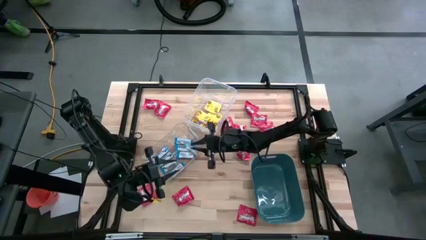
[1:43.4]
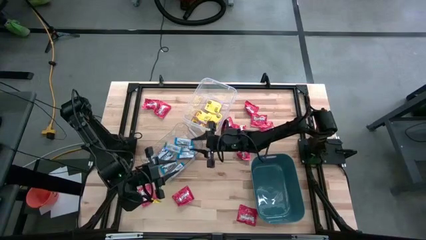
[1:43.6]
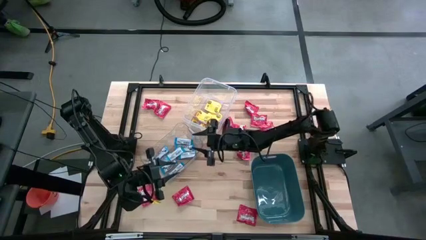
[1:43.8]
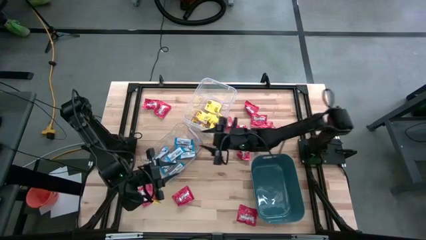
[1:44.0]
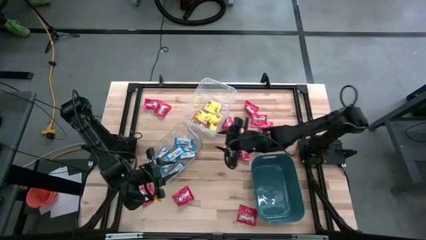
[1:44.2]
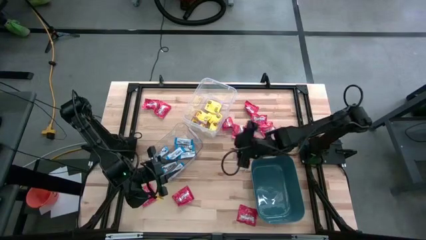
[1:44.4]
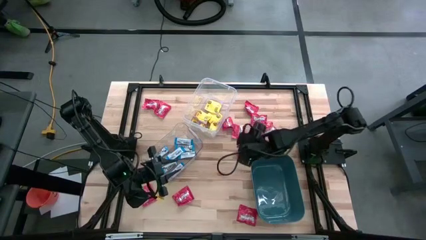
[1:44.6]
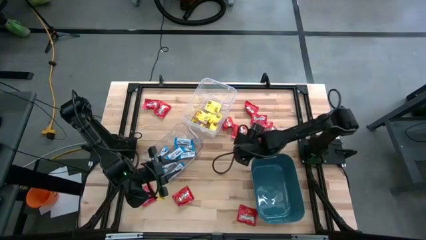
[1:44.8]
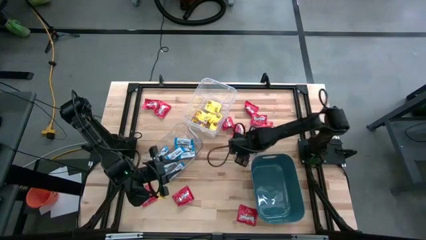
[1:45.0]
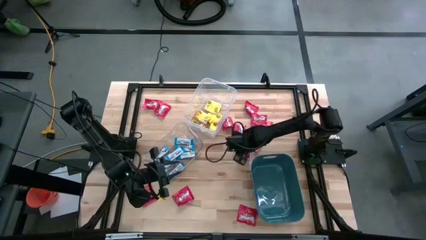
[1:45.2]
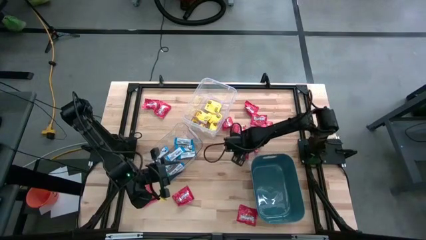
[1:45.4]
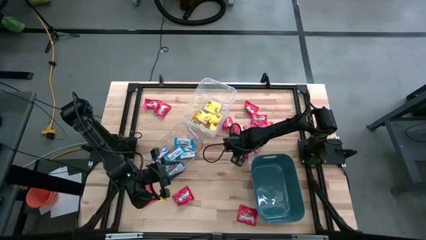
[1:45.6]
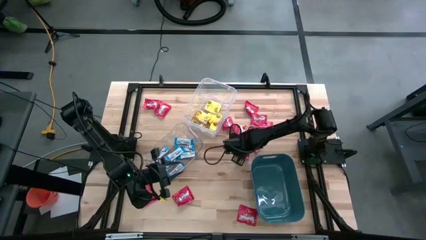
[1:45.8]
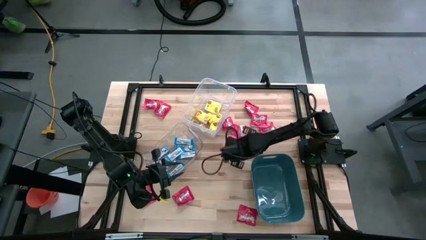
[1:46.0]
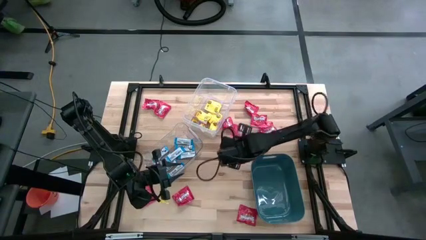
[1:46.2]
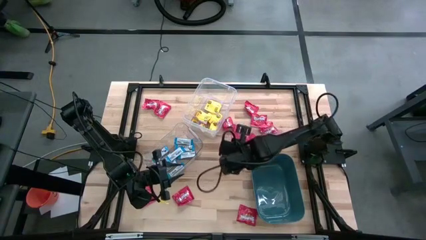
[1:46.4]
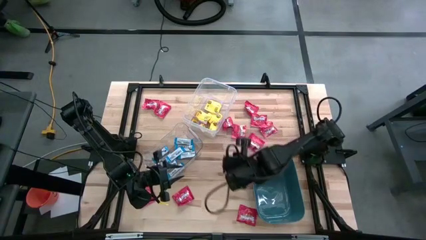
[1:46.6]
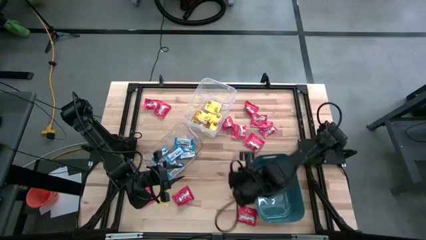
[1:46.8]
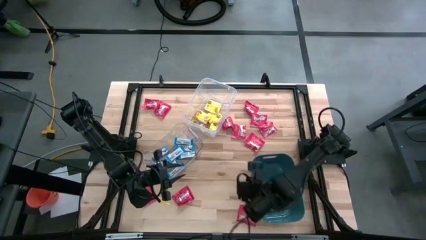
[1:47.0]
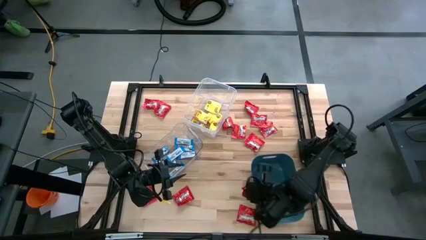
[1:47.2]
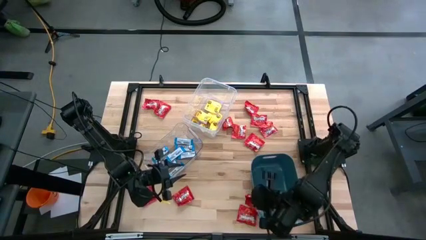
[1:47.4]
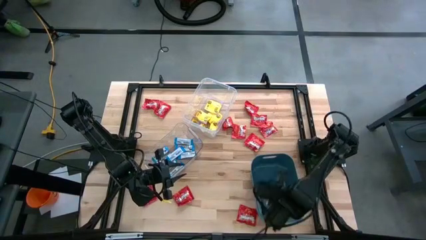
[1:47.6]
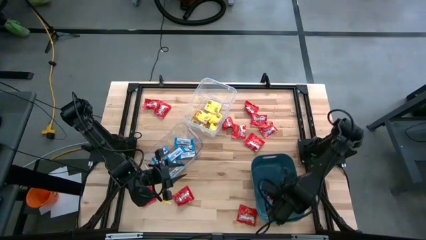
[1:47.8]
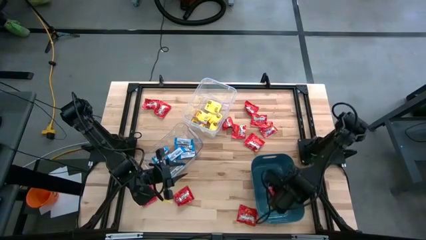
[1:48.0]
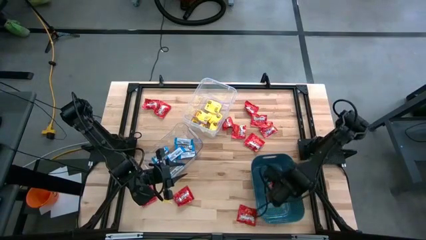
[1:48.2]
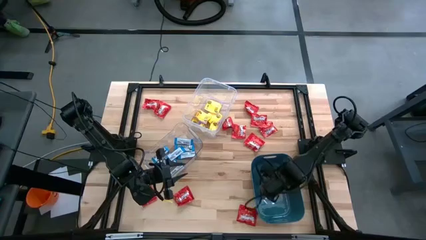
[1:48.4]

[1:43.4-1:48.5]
Task: Sort candy
Put the red candy into the blue bin

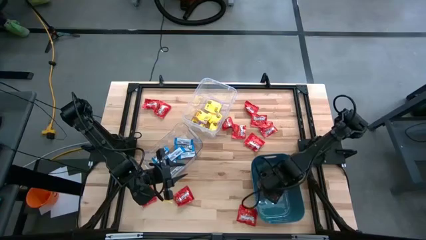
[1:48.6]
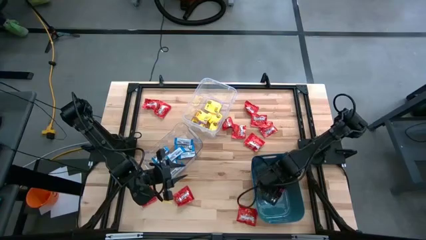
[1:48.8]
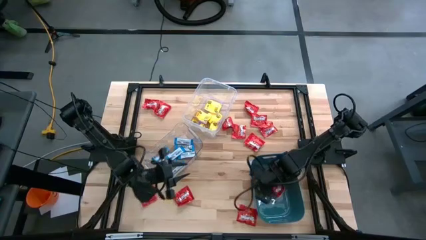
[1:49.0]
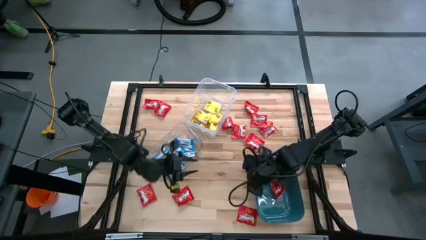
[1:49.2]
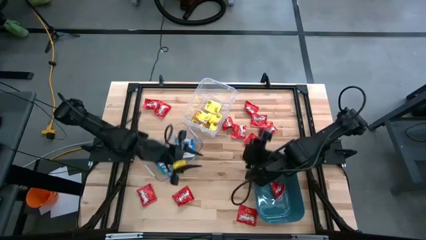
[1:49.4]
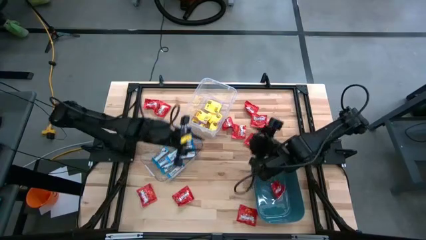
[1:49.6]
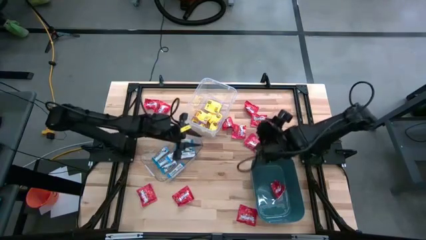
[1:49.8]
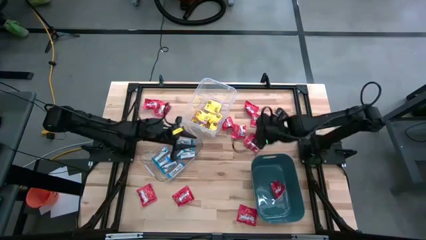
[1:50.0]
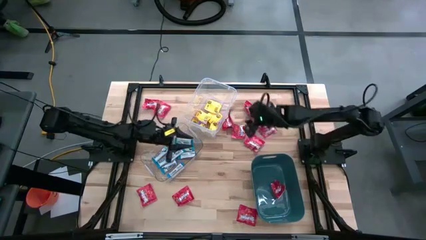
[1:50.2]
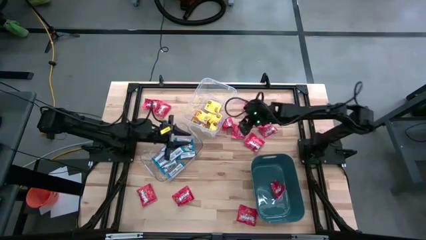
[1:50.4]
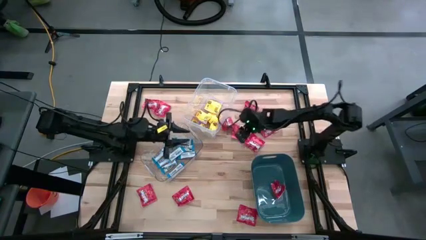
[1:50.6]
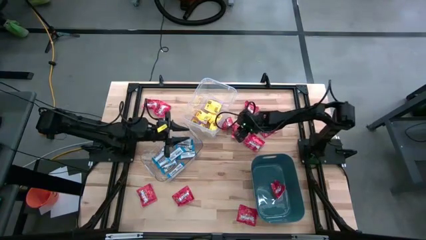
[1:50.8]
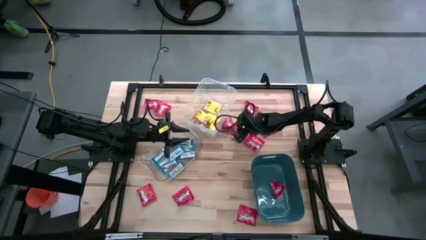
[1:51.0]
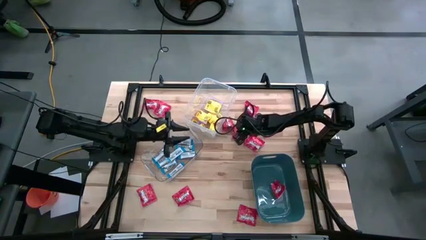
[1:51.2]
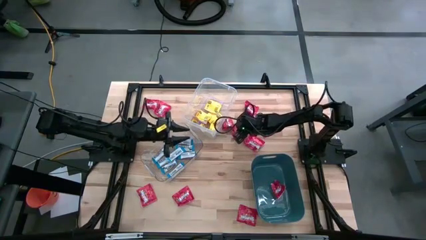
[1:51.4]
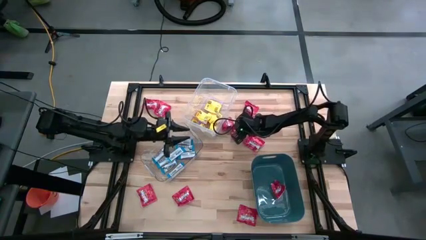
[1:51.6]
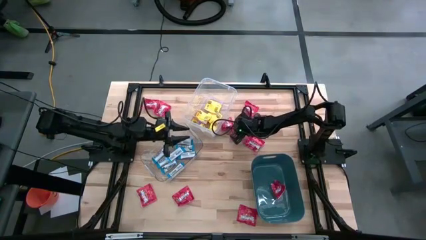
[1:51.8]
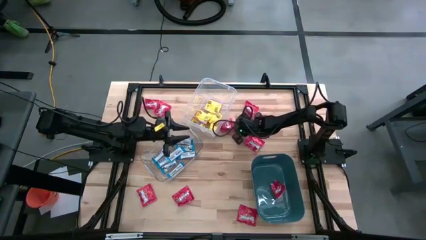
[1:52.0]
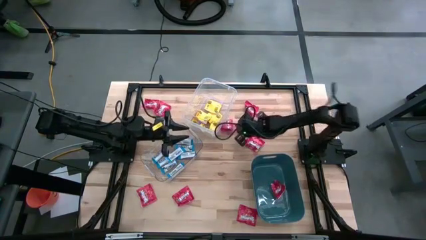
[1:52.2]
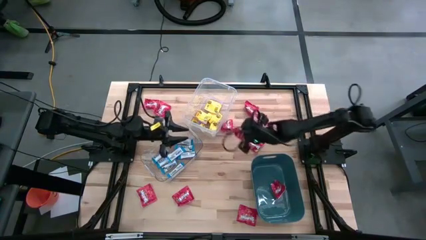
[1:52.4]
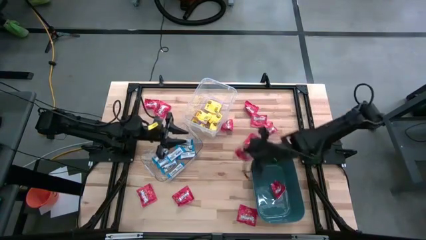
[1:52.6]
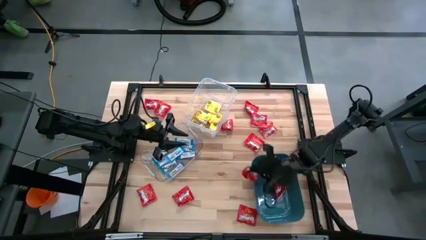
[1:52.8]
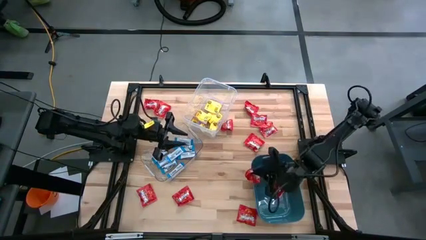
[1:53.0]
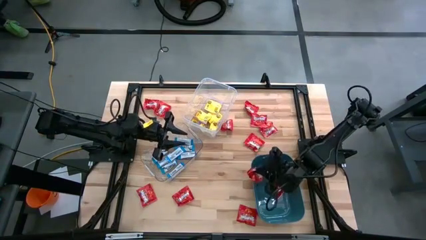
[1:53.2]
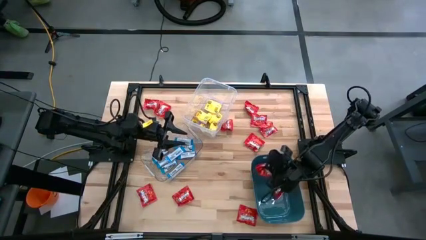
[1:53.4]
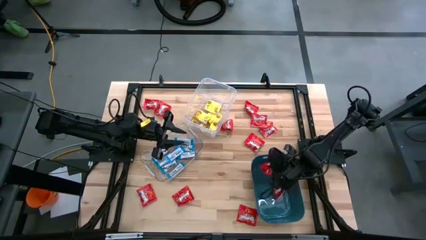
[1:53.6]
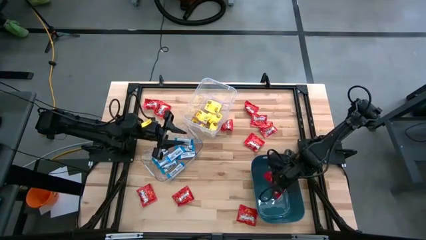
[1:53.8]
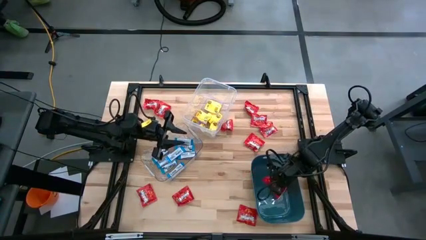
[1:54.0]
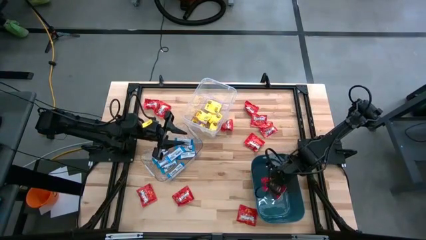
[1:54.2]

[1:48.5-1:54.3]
Put the red candy into the blue bin

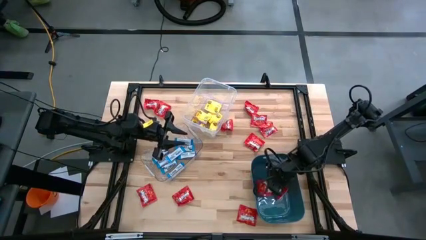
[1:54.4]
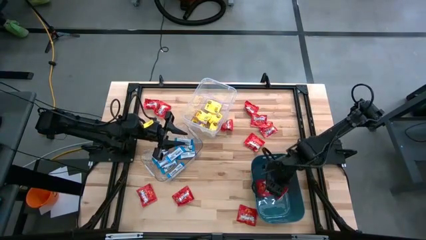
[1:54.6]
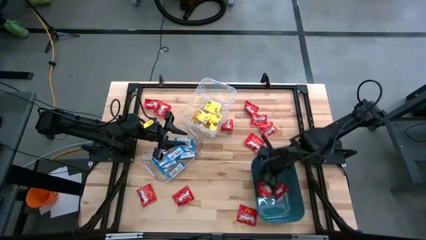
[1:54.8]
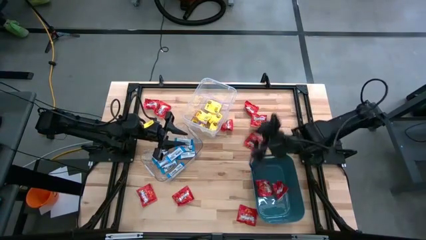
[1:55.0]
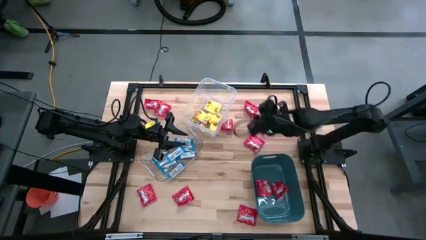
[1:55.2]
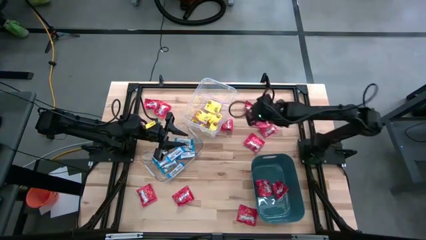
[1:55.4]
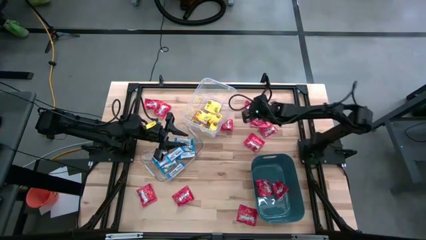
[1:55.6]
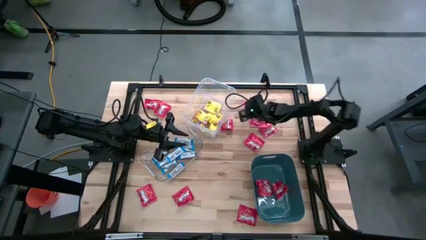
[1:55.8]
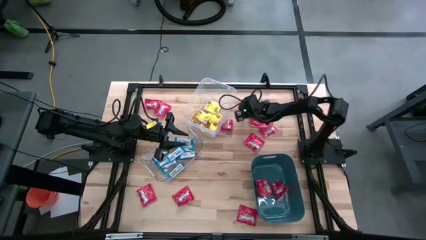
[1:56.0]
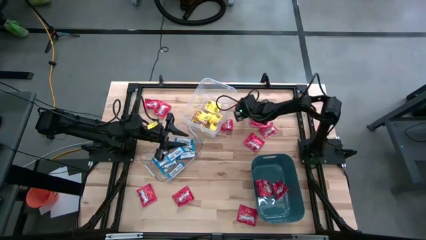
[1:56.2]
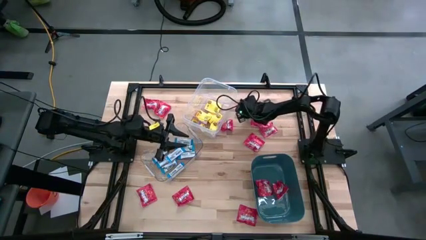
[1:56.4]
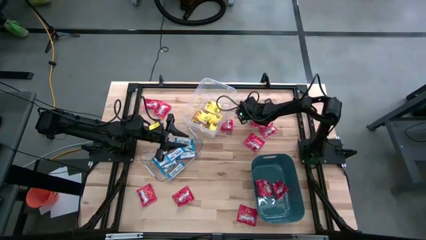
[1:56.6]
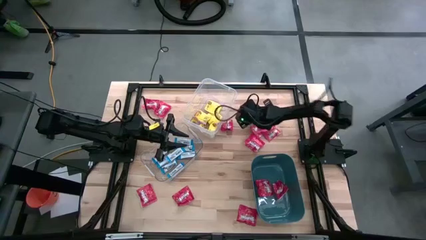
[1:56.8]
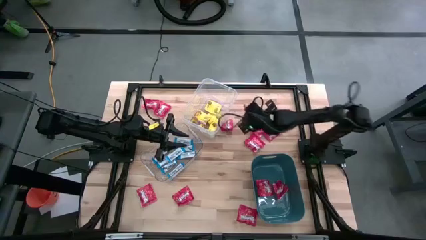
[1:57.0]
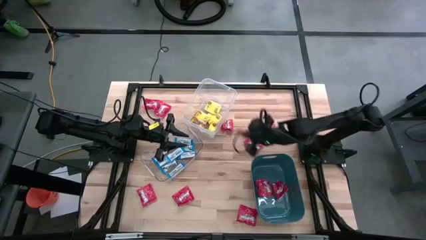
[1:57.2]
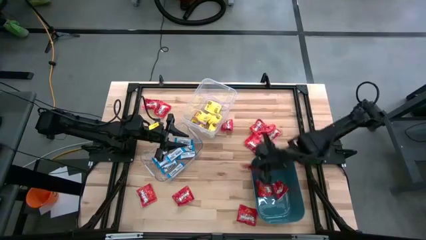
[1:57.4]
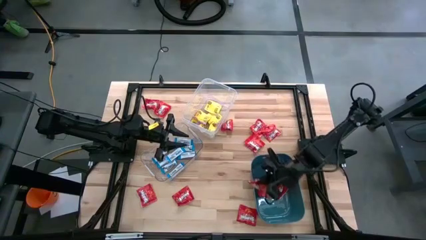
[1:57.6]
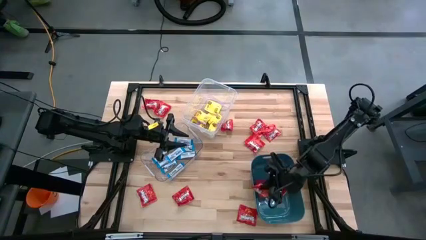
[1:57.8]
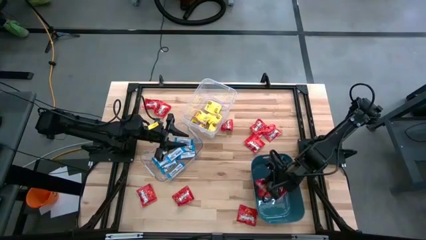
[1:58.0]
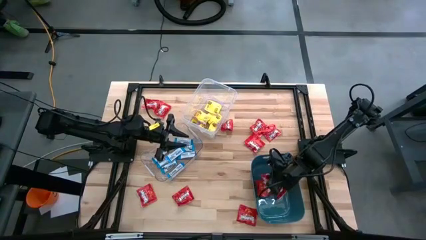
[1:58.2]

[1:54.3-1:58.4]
Put the red candy into the blue bin

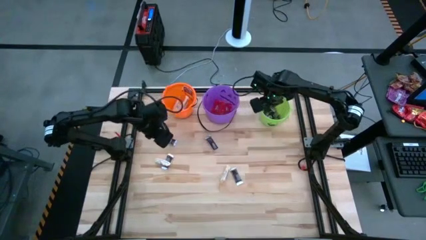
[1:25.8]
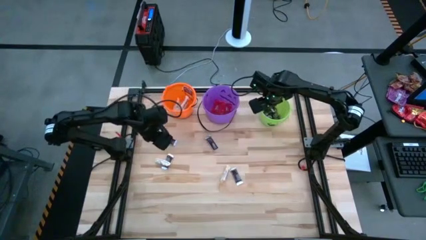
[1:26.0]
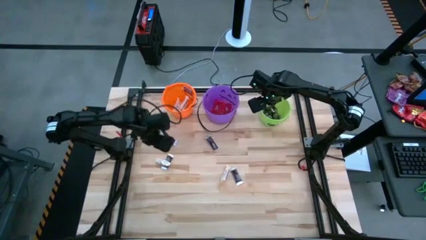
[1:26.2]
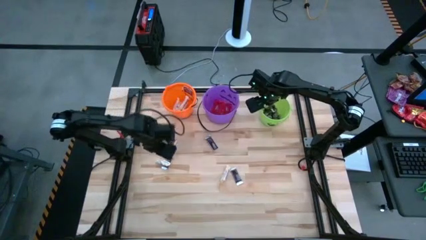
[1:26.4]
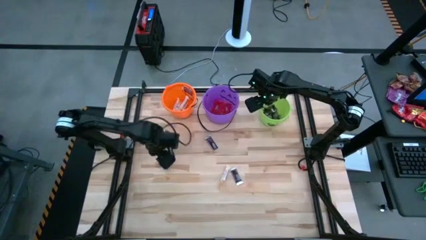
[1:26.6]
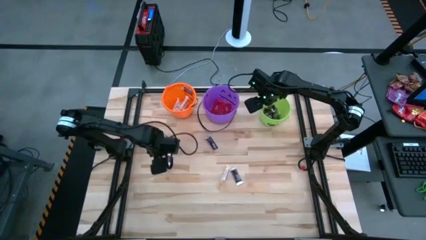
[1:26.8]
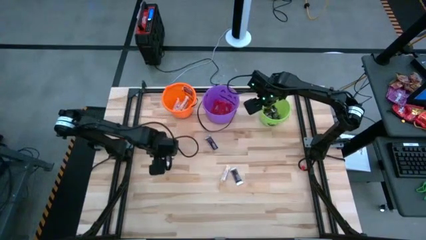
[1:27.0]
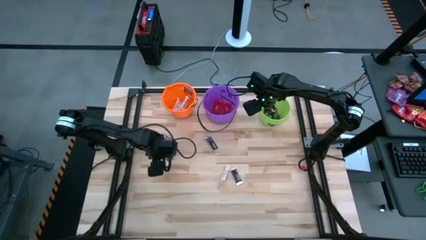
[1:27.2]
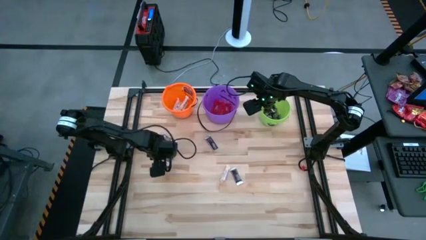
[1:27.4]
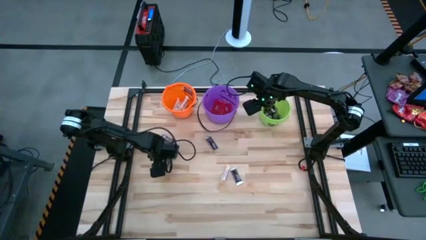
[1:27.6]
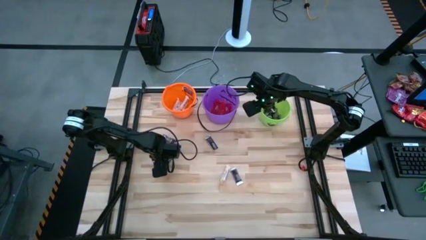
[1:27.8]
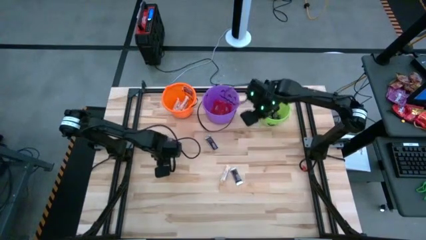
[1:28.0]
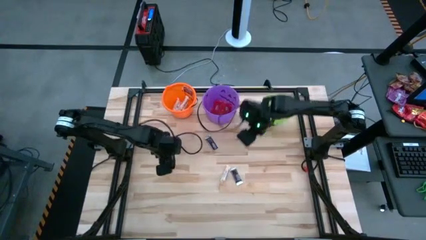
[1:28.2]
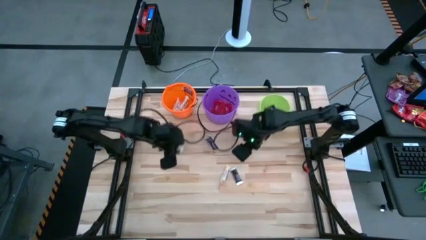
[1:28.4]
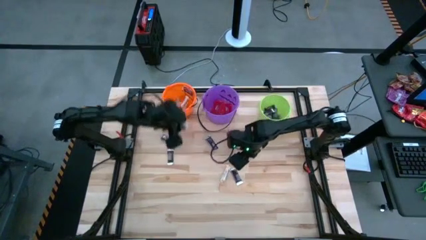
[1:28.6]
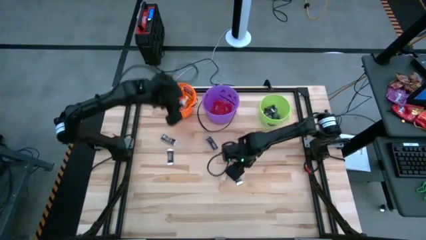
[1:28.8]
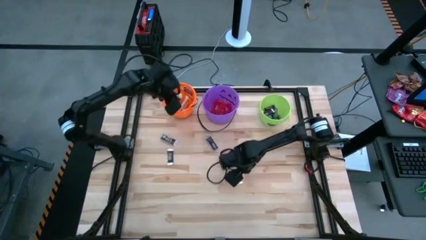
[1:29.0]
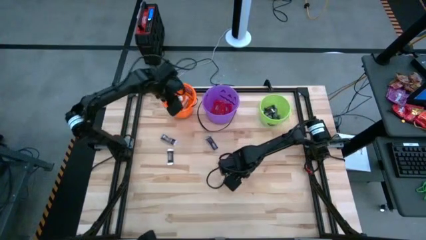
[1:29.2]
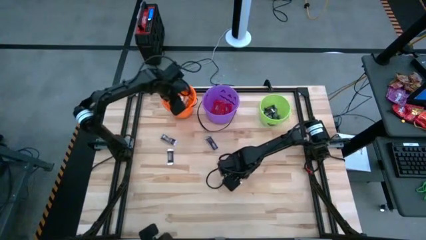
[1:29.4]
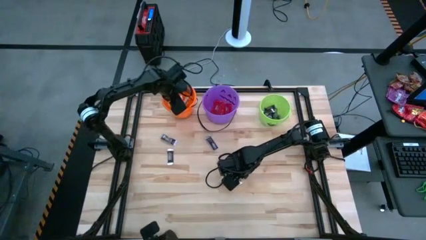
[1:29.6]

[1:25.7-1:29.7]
Task: Sort candy by brand, put in halloween buckets
Put the white chocolate bar into the orange bucket
